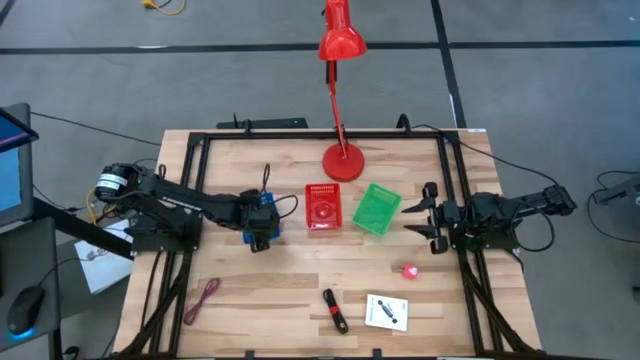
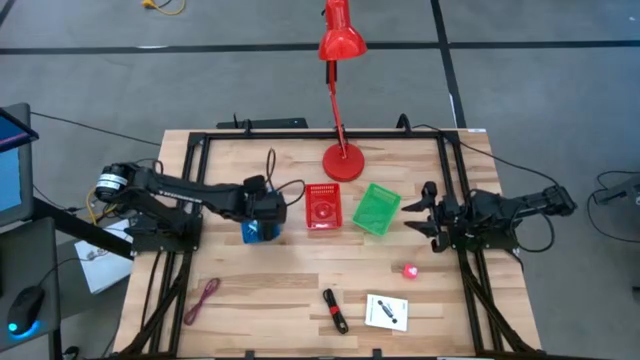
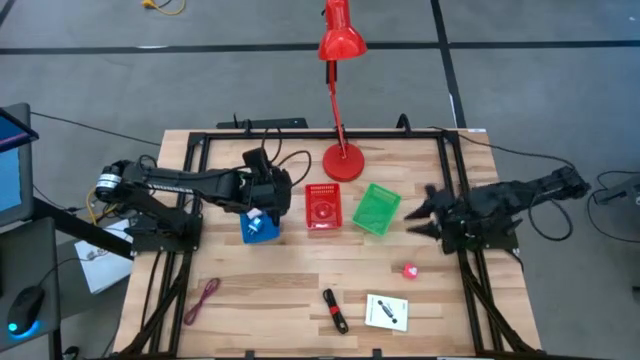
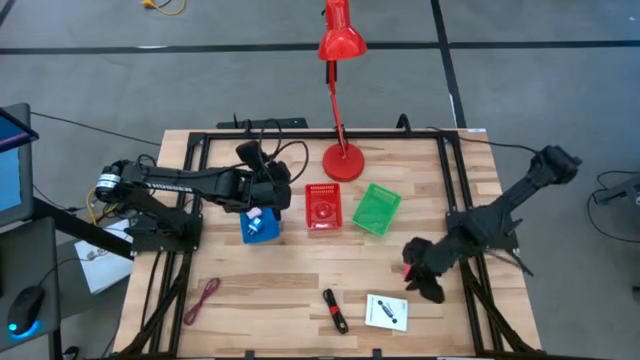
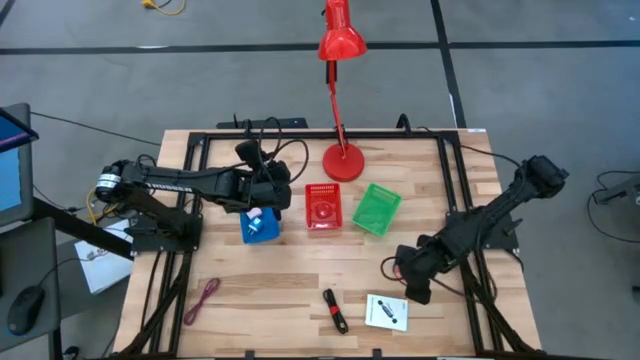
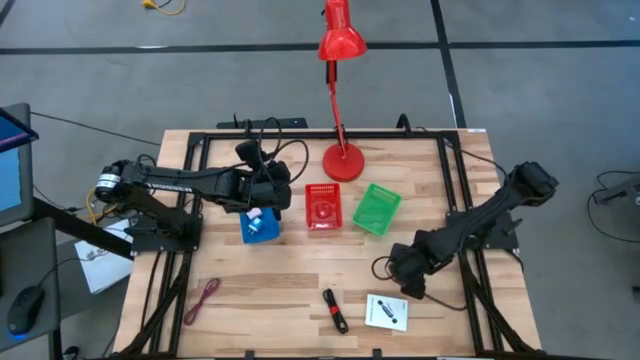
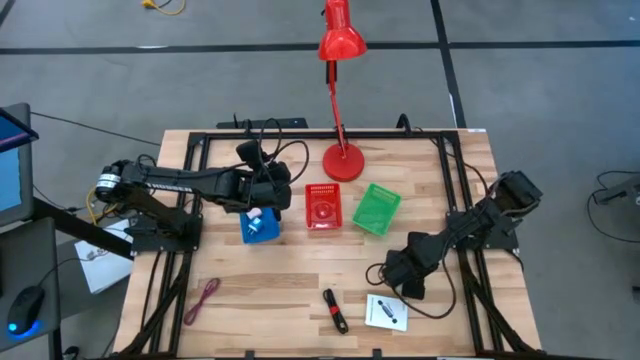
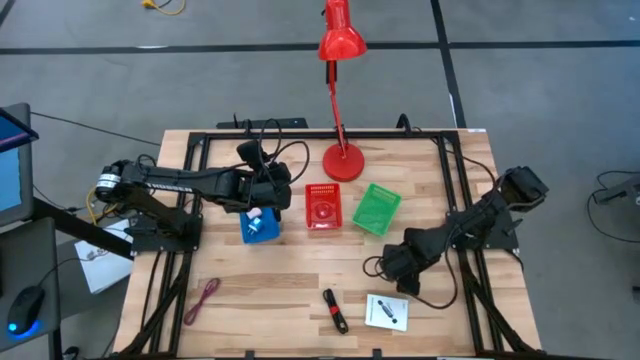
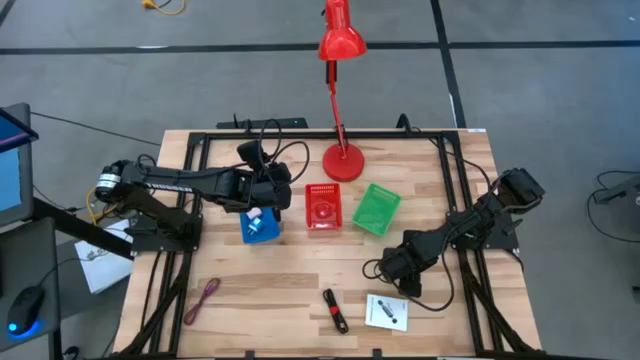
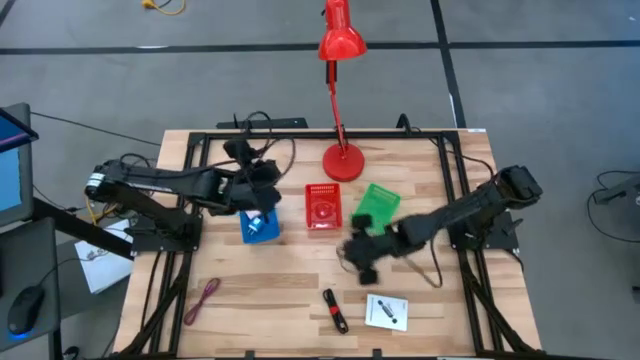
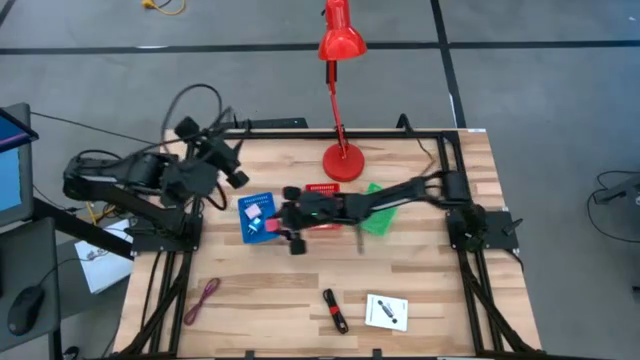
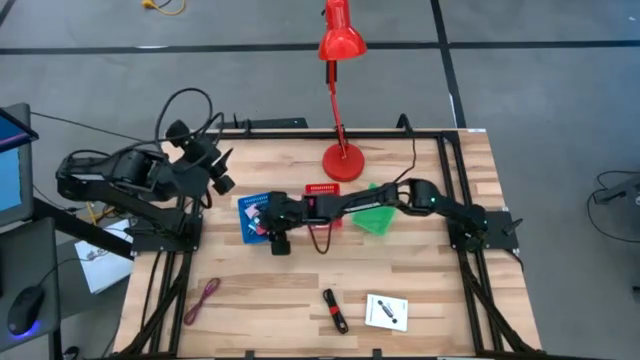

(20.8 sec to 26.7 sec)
Task: Pick and place items into bin
Put the pink charger adapter into the blue bin

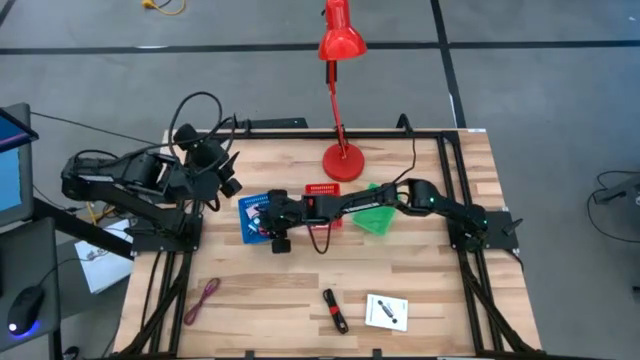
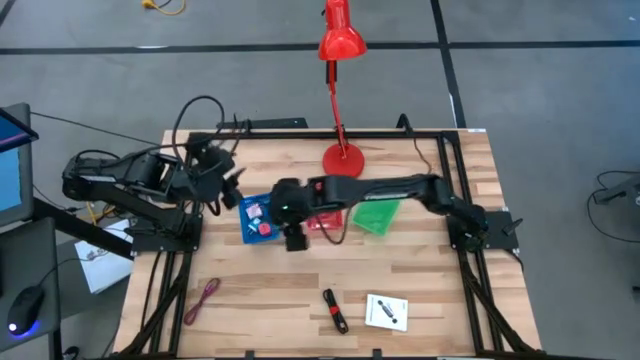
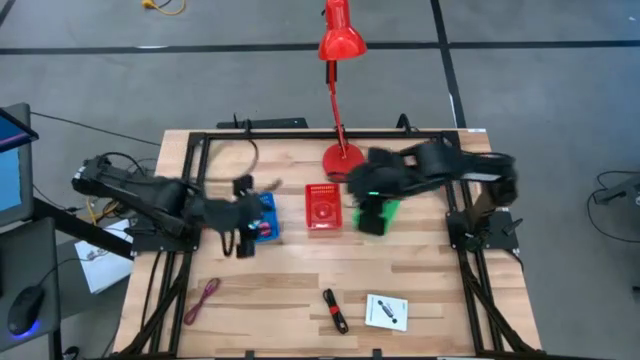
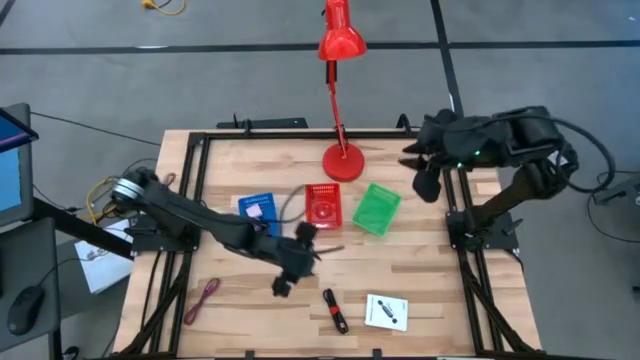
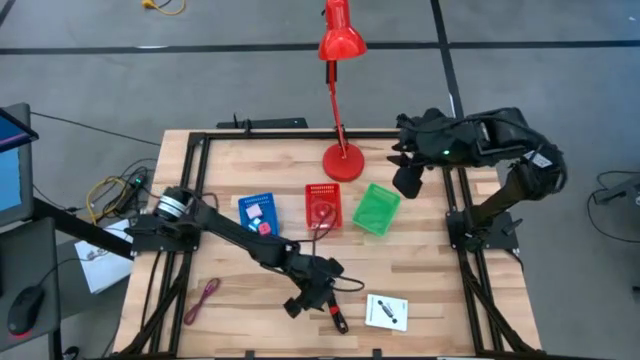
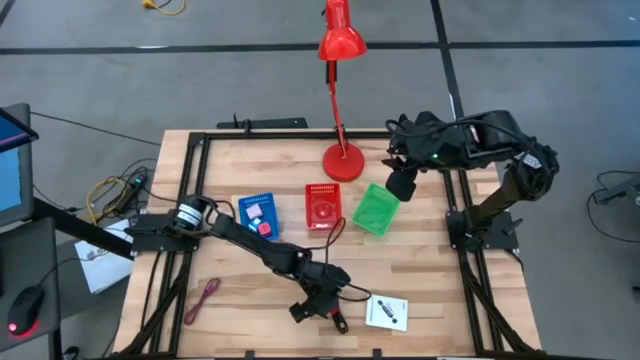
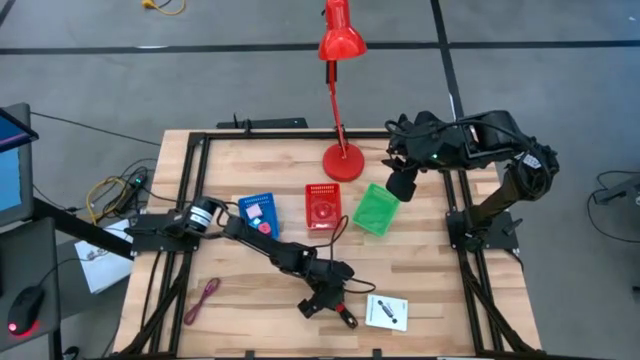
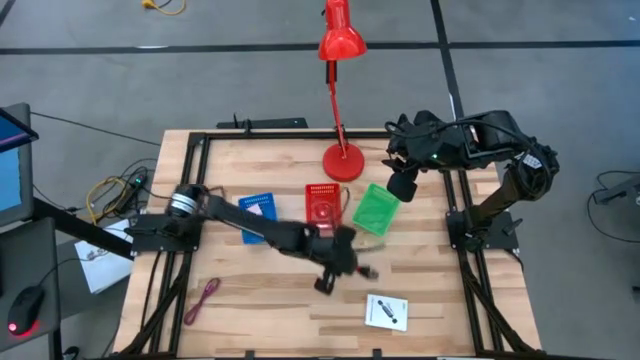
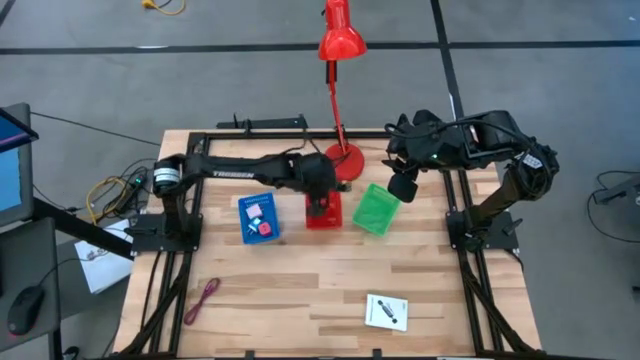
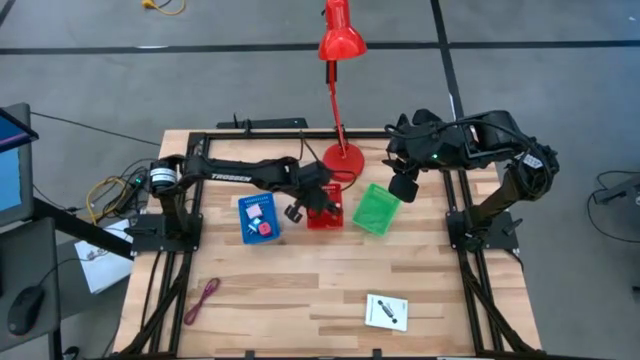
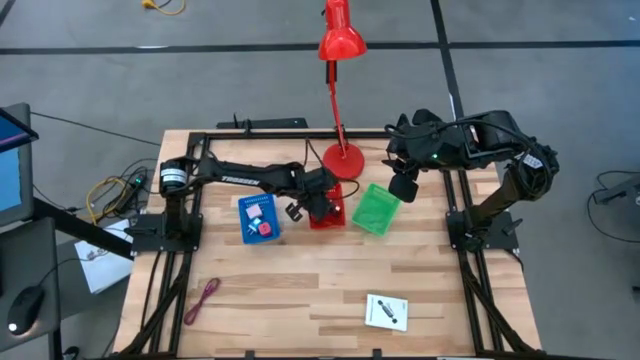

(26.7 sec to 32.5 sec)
Put the black charger cable into the red bin

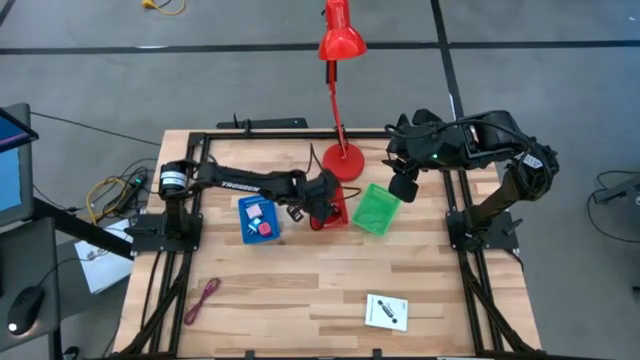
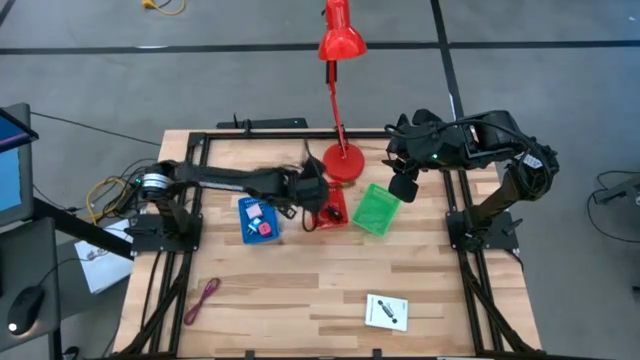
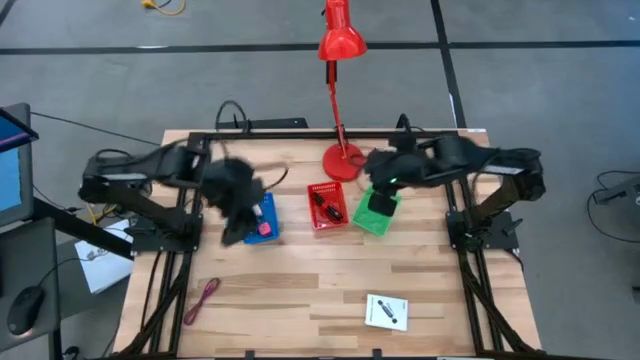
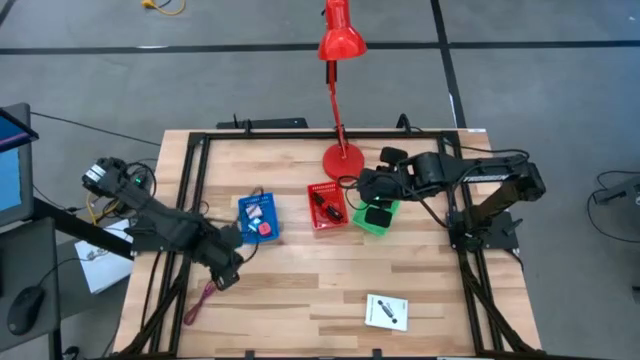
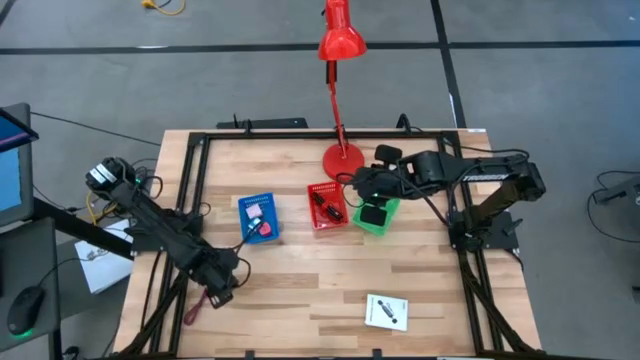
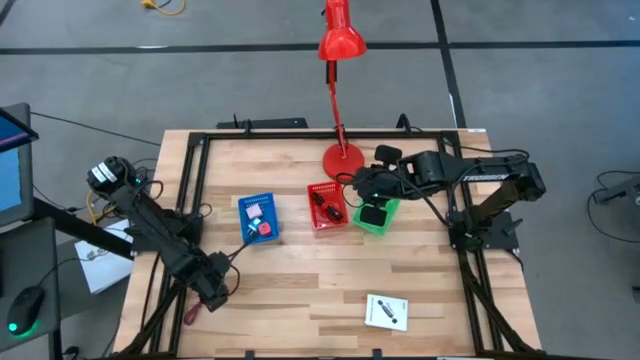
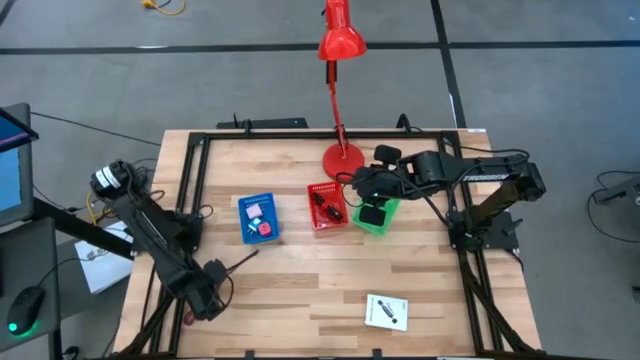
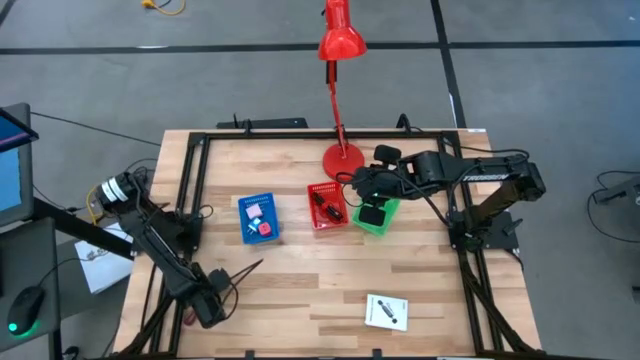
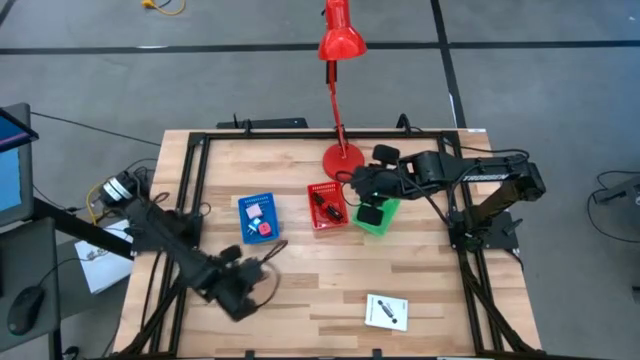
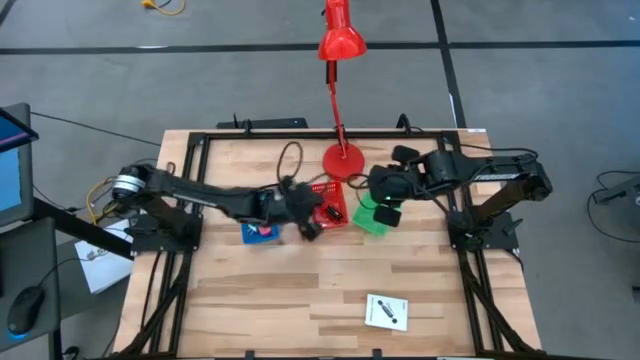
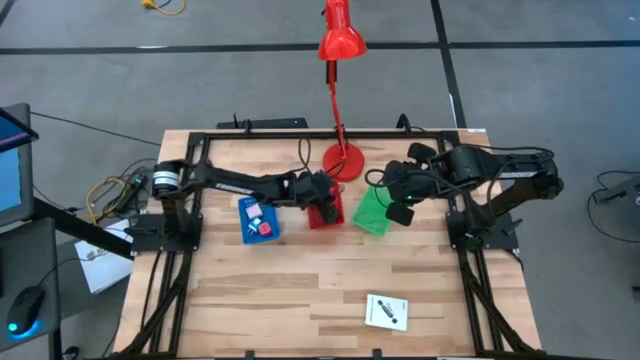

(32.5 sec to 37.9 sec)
Put the purple charger cable into the red bin

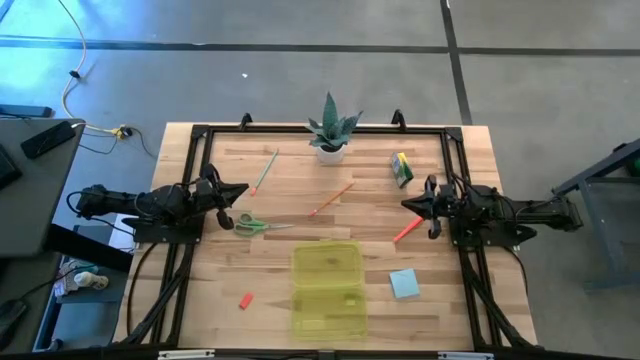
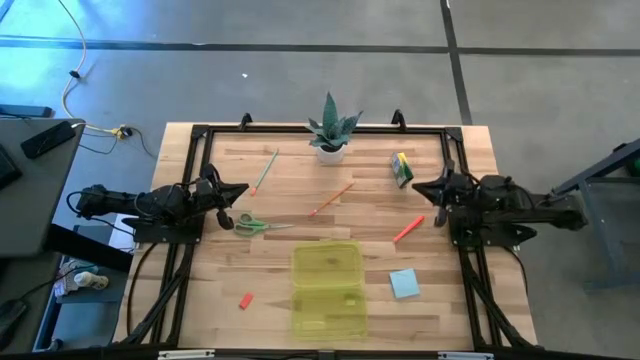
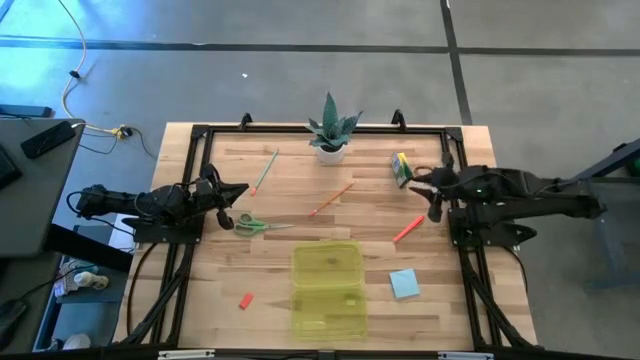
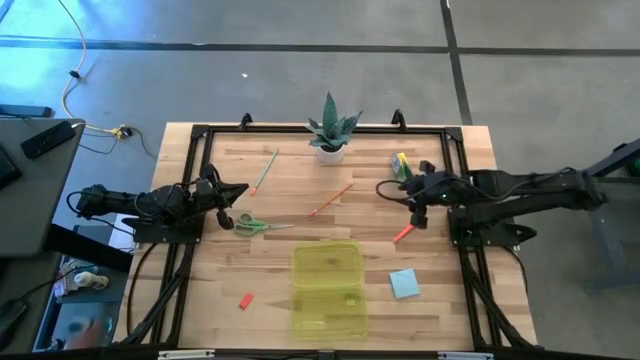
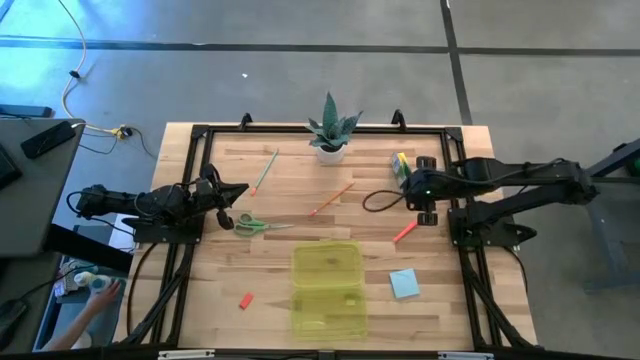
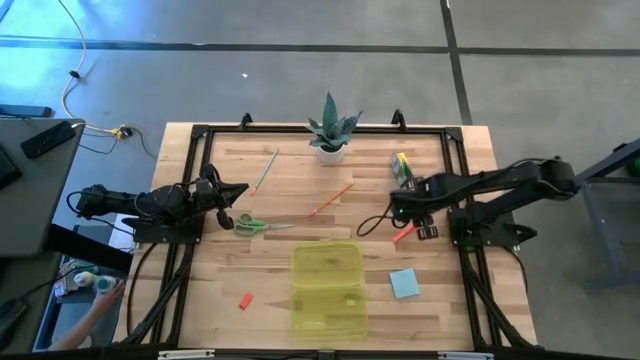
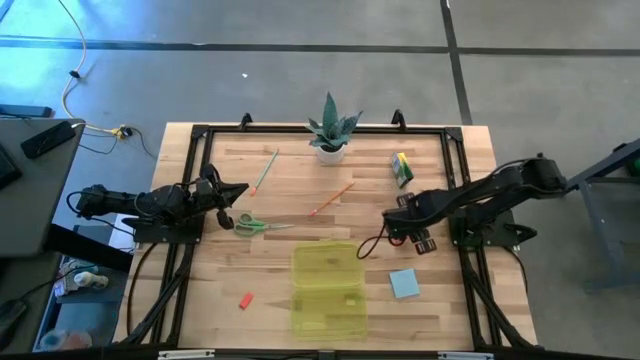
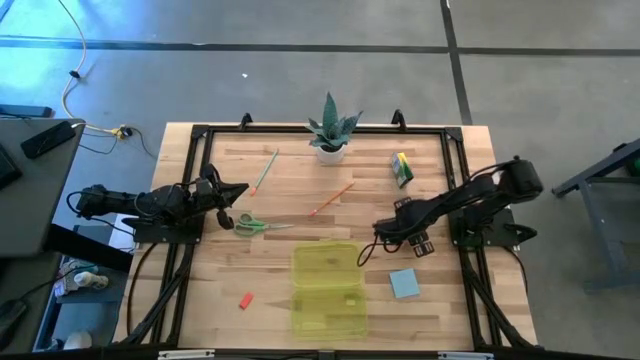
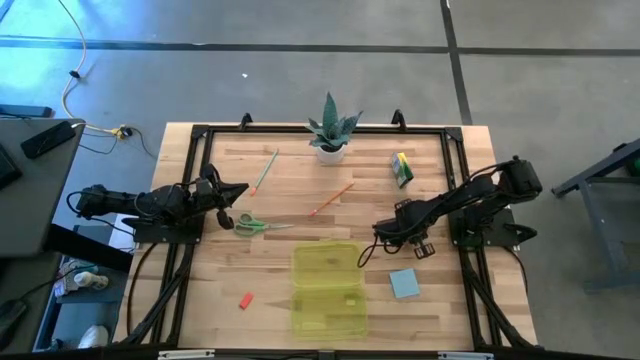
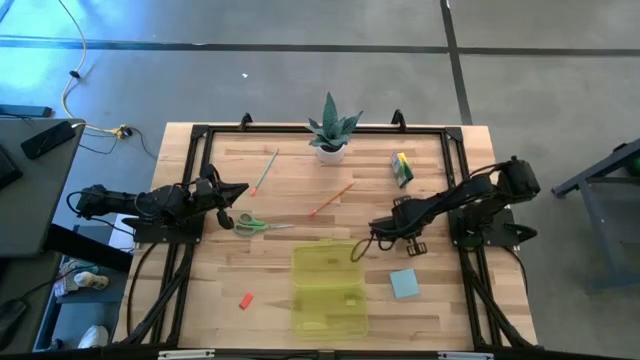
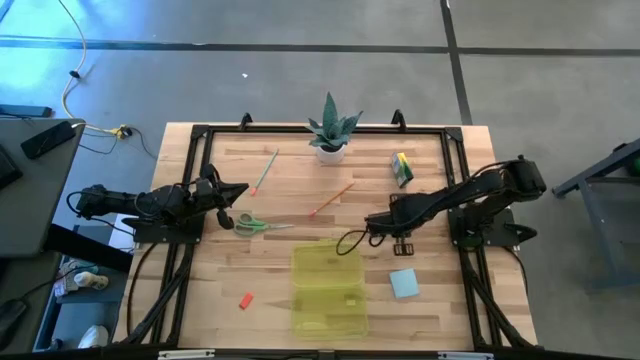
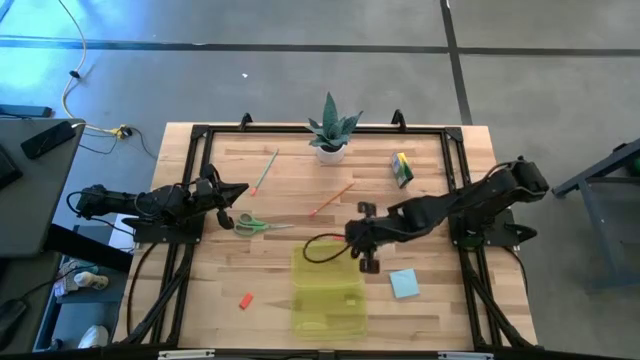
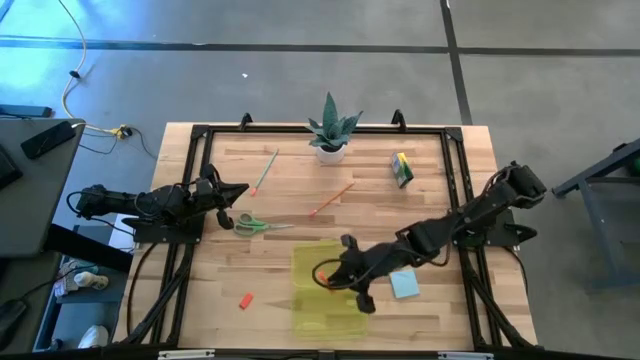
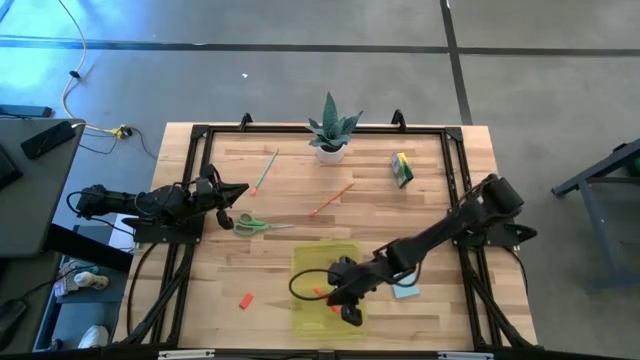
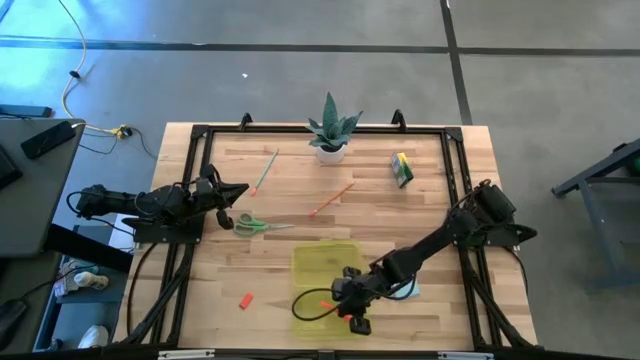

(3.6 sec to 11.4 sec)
Task: Pack school essentials
Put the orange pen into the yellow supply box
